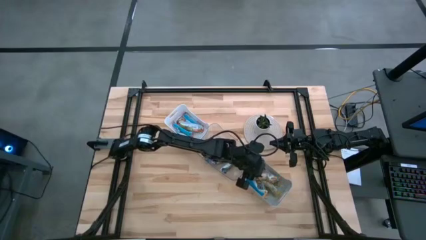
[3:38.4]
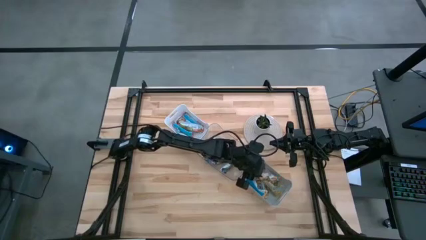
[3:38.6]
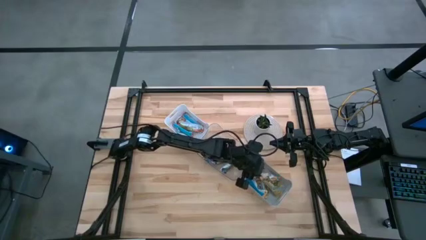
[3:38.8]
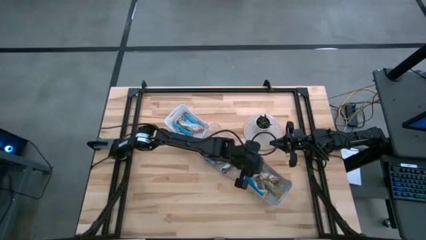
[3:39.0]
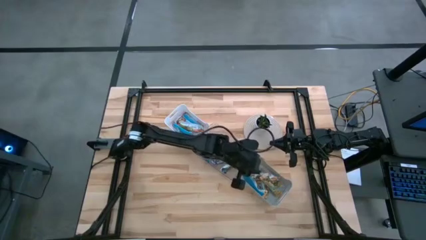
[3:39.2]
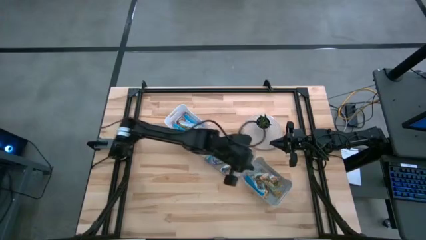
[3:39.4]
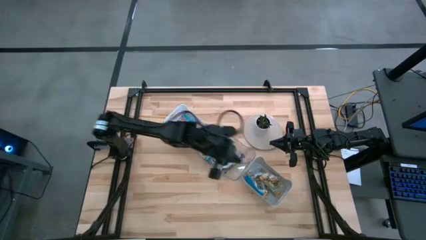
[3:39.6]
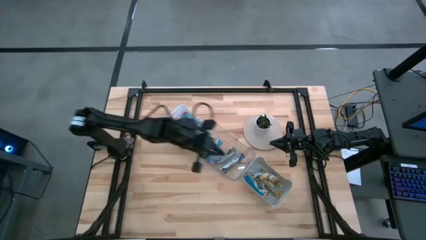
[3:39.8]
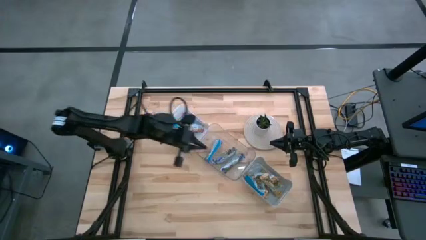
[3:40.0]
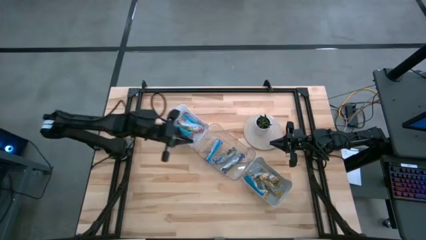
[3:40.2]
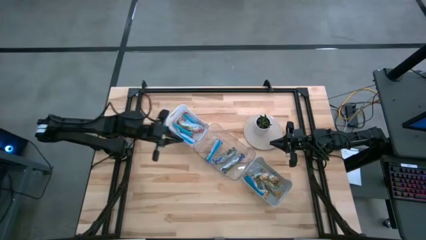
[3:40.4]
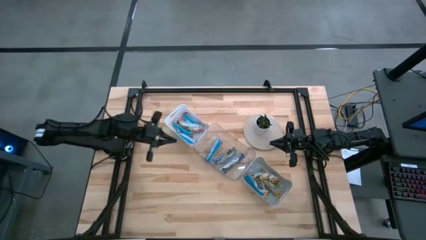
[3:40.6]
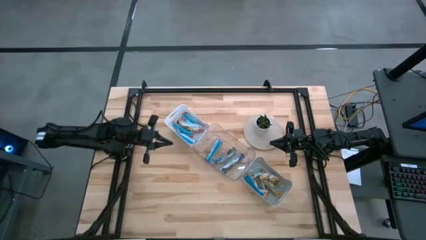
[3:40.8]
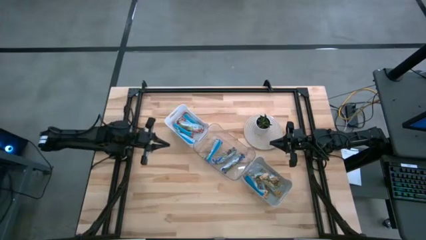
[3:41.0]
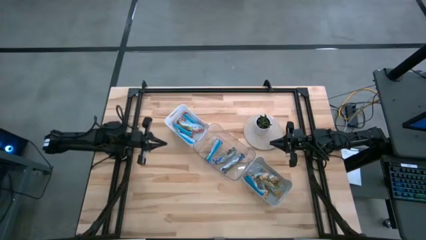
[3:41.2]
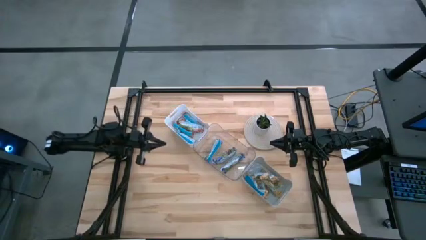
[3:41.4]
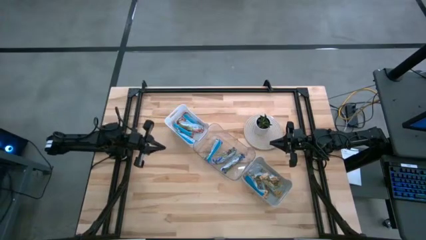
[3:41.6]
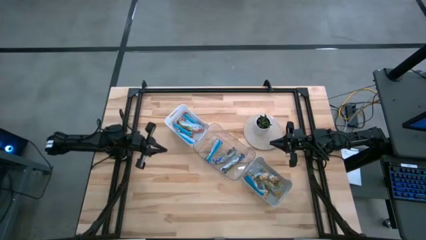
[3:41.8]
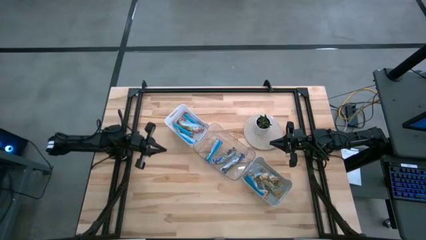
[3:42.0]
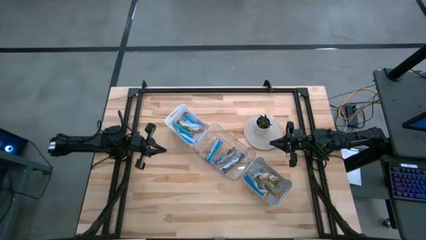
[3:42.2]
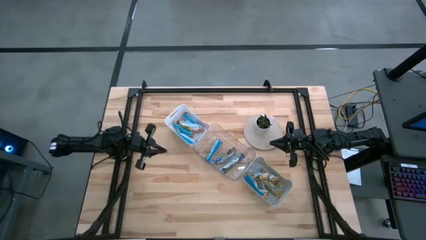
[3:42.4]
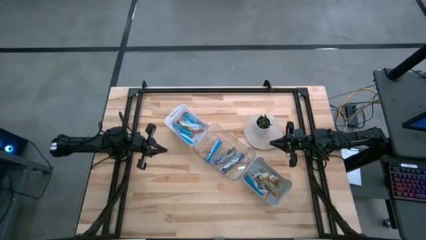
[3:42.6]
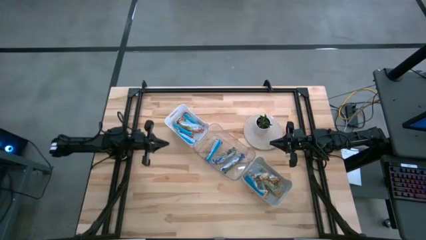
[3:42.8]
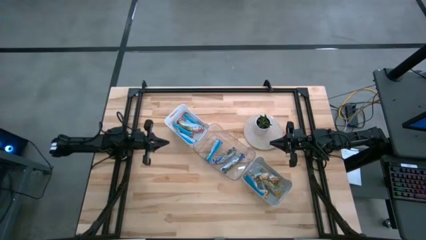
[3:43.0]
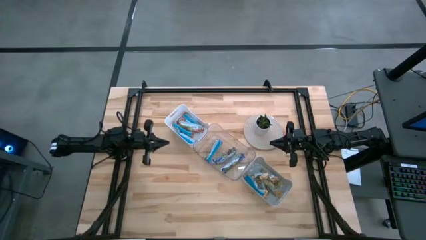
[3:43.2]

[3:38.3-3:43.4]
Task: Pick and place Granola Bars by type
Return to Home Position

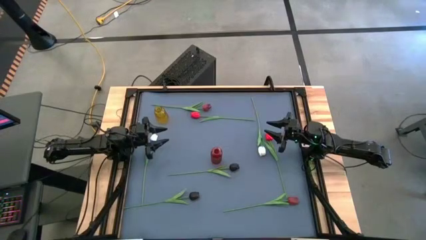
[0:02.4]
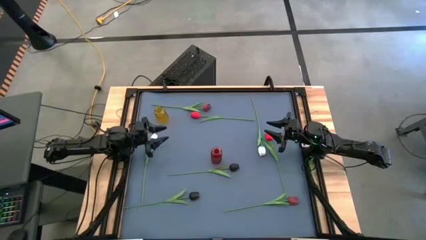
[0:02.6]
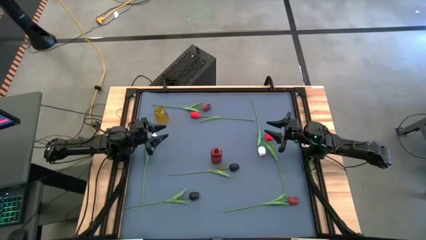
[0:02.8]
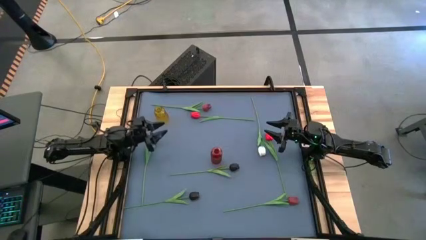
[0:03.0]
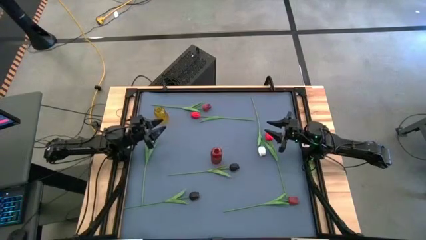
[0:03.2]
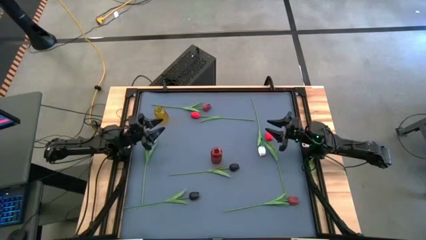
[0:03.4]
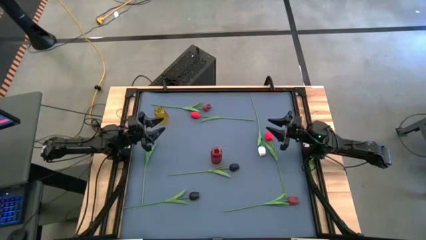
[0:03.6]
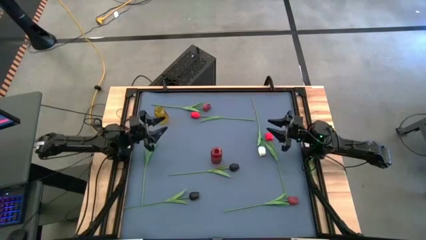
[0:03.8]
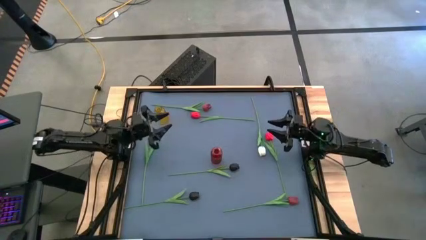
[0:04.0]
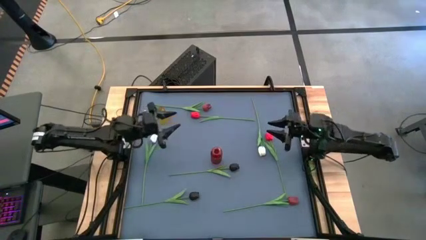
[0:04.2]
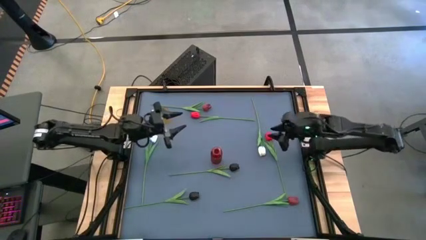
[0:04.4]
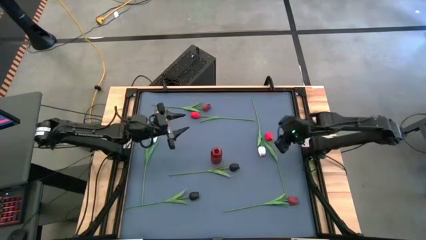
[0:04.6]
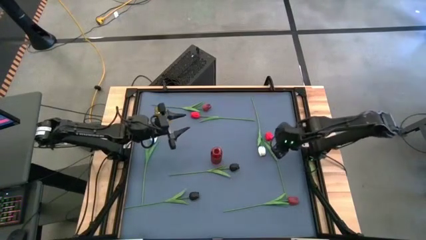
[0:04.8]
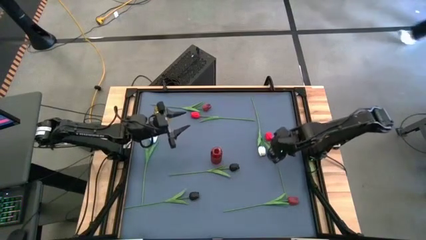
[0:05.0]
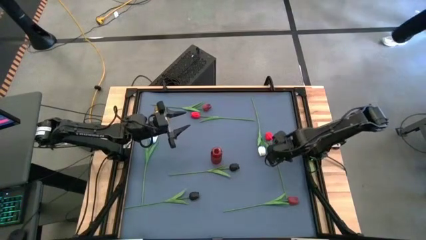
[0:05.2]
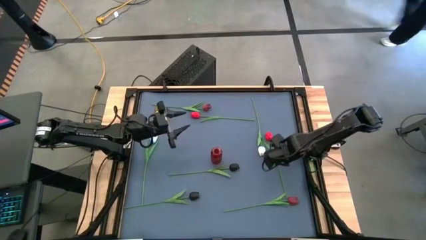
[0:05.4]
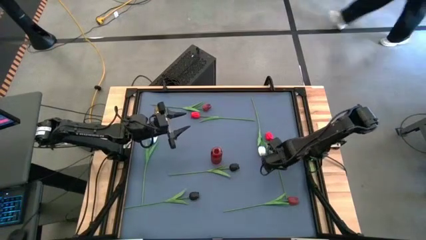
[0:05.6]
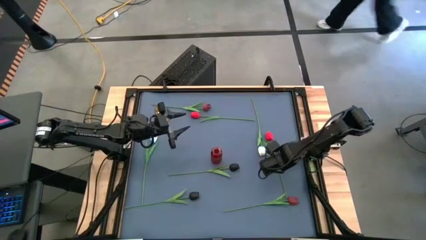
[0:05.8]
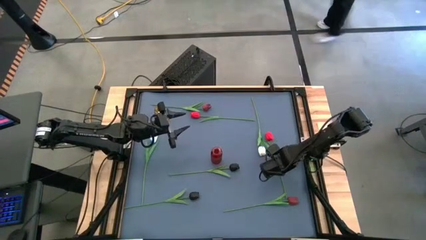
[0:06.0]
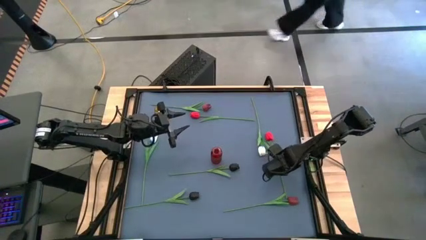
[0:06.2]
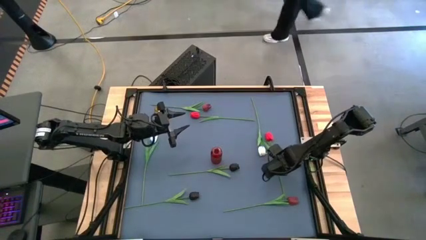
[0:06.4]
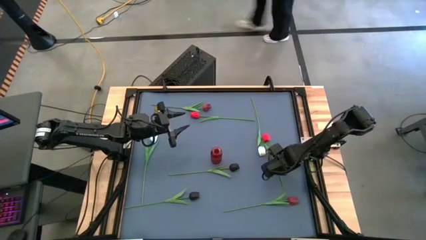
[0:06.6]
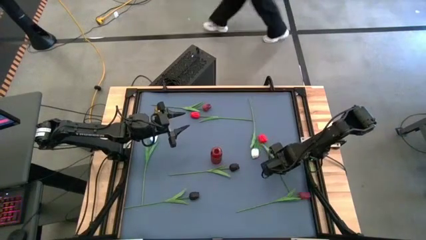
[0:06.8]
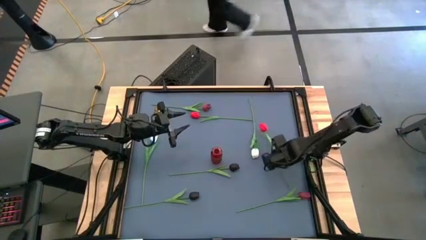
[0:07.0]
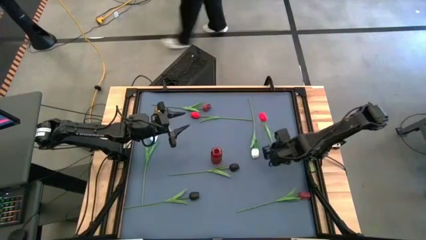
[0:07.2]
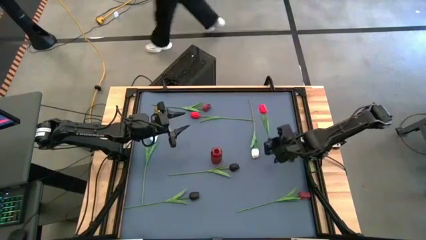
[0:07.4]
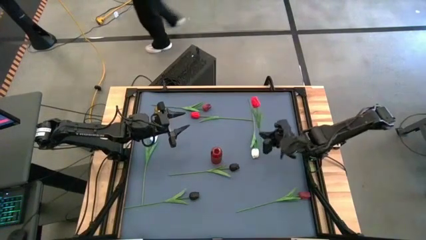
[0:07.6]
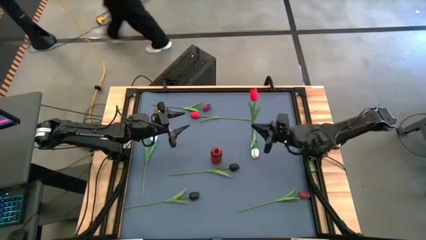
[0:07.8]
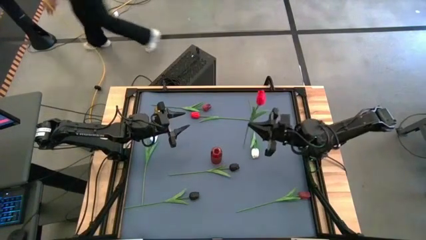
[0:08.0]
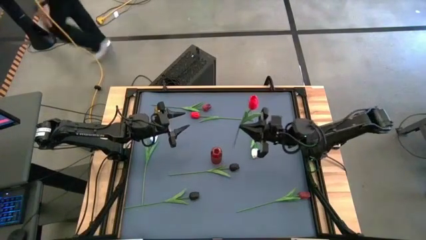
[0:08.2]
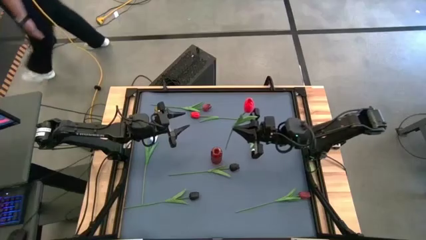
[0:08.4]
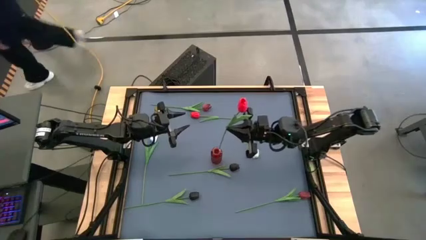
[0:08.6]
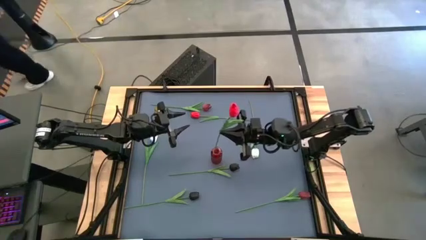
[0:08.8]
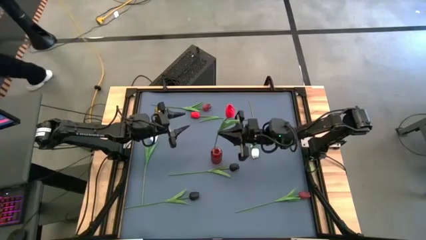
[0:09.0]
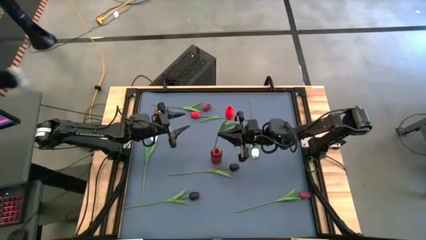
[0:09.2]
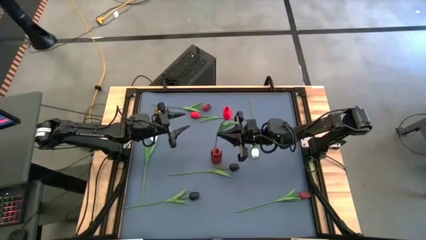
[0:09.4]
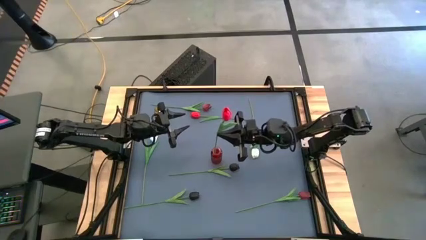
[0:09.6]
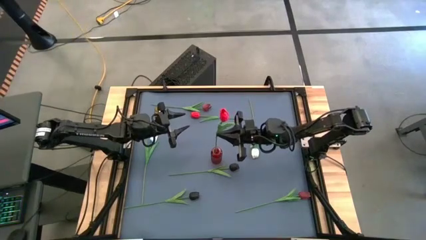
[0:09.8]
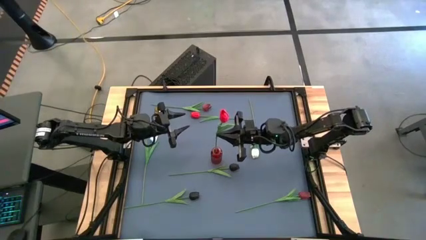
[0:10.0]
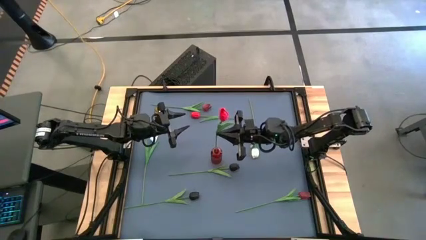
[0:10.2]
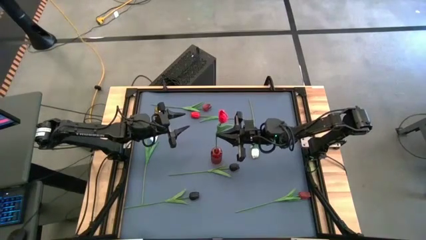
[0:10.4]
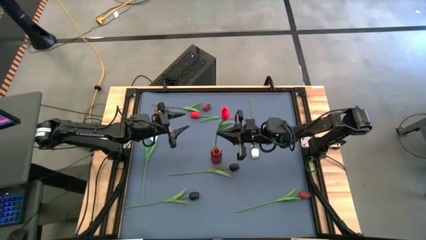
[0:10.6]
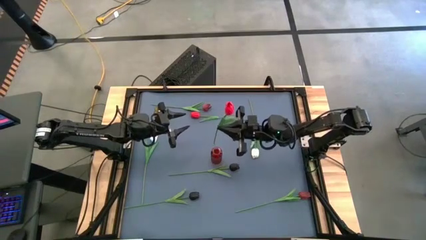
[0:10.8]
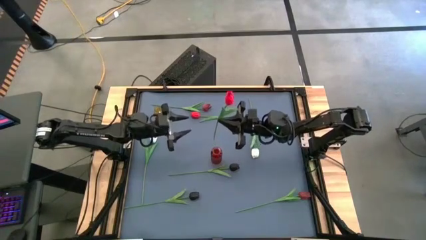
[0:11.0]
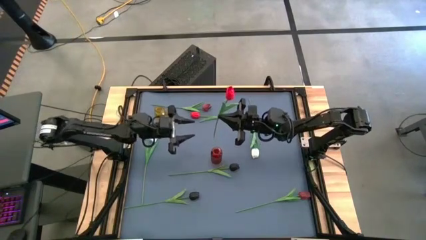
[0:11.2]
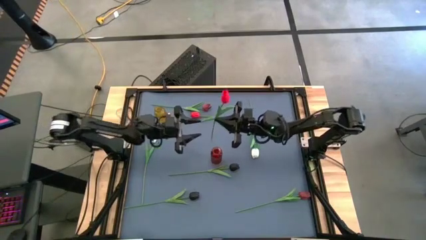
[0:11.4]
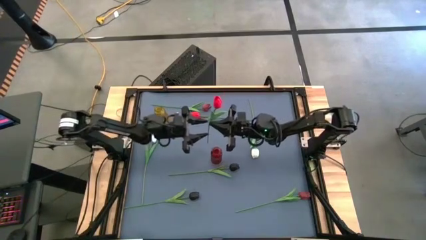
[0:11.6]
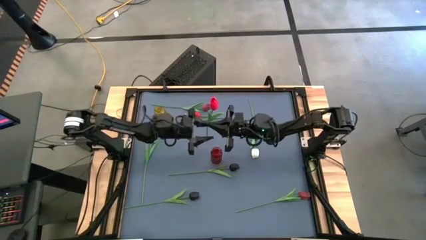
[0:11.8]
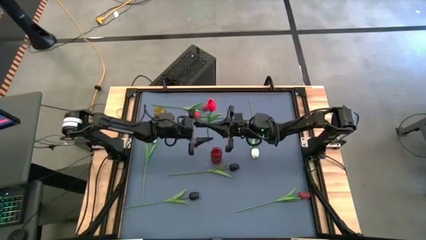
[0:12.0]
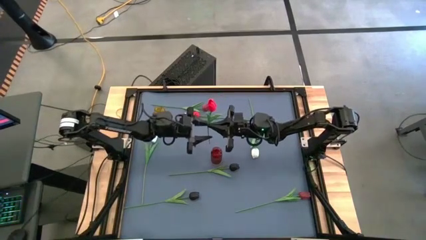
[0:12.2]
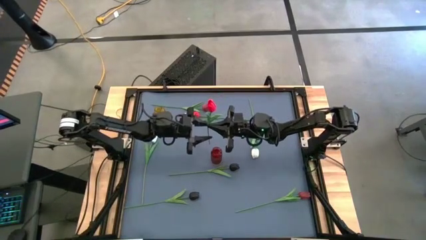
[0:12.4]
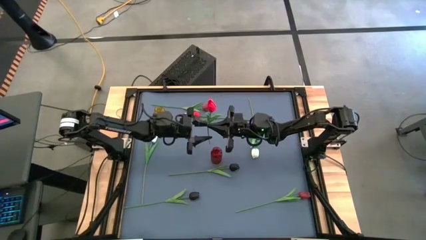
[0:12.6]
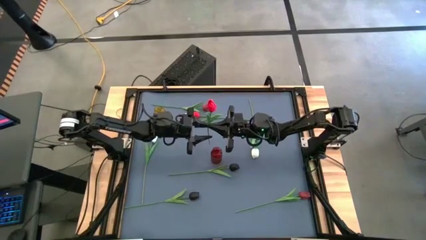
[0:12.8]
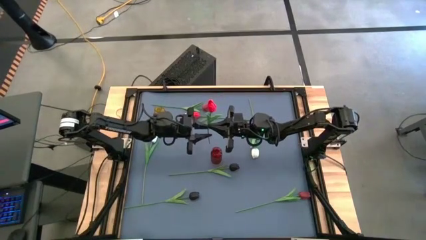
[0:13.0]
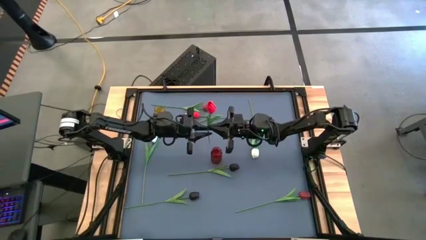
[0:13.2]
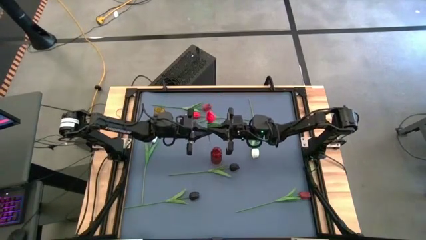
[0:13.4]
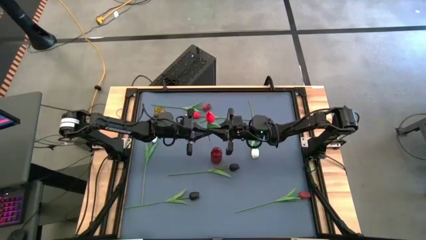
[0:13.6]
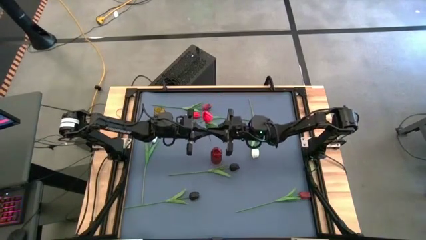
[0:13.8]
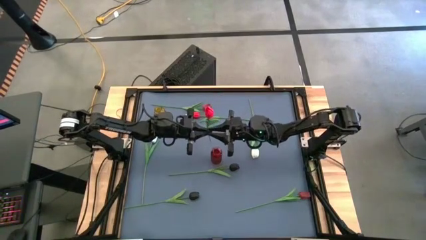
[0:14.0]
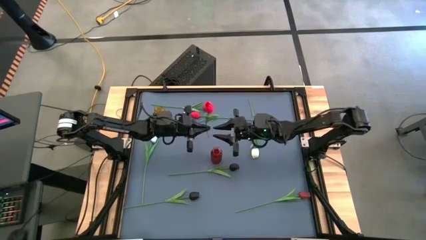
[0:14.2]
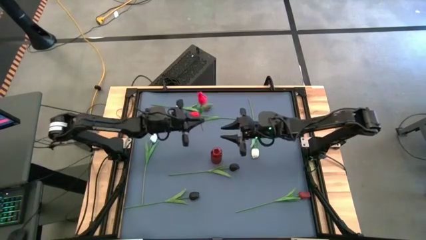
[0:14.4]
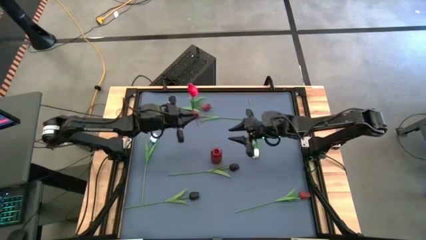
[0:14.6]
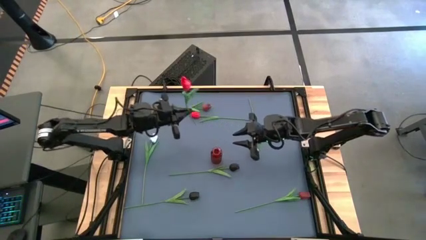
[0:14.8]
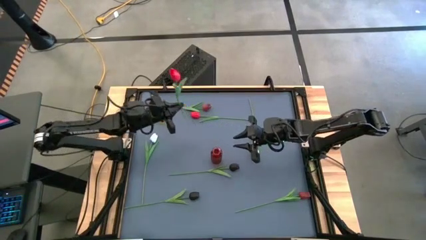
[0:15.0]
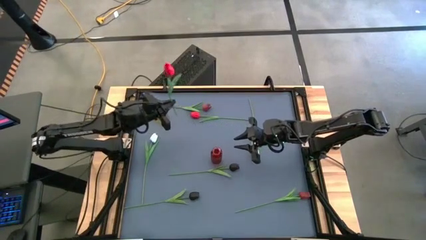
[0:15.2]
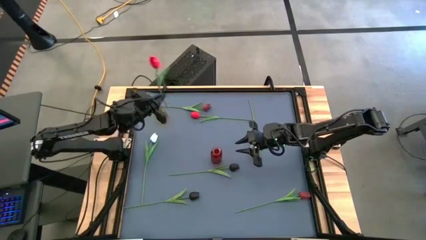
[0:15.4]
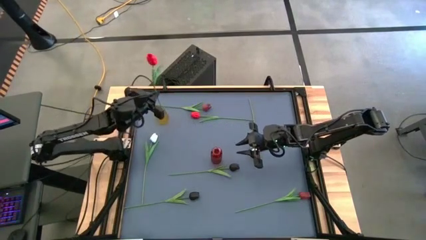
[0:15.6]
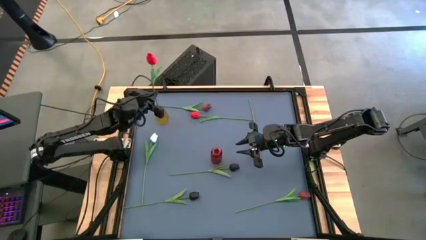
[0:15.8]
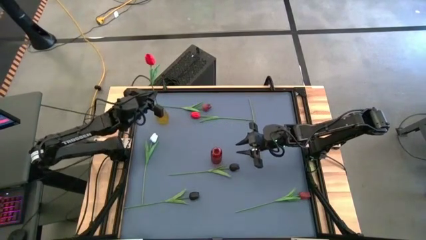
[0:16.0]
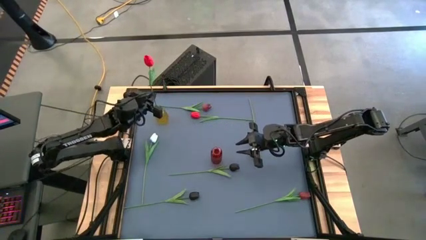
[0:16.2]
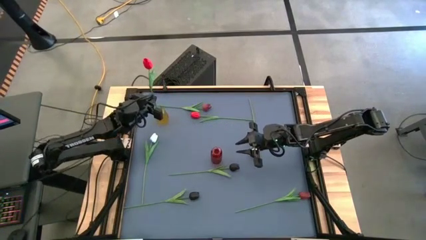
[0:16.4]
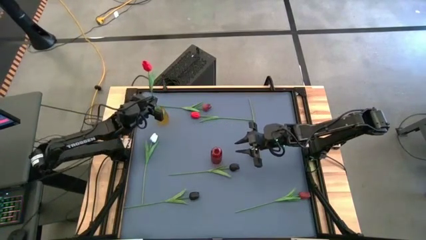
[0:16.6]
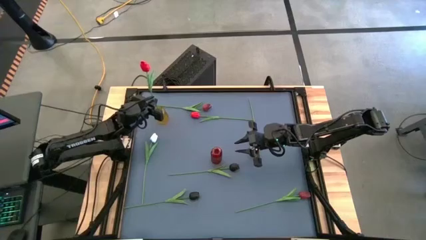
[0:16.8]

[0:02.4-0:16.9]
Task: Sort flowers into vase by color
Put the bottom red tulip into the yellow vase
